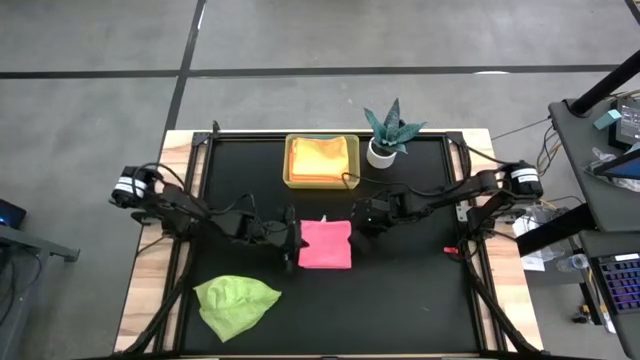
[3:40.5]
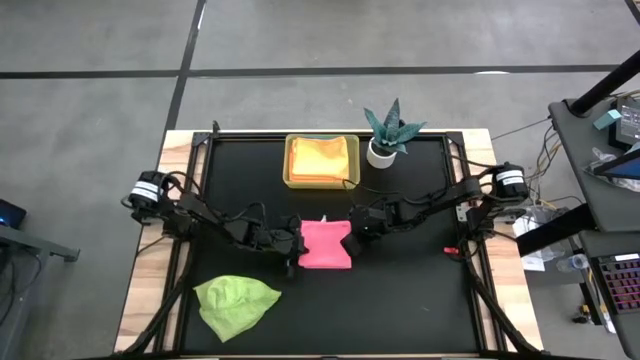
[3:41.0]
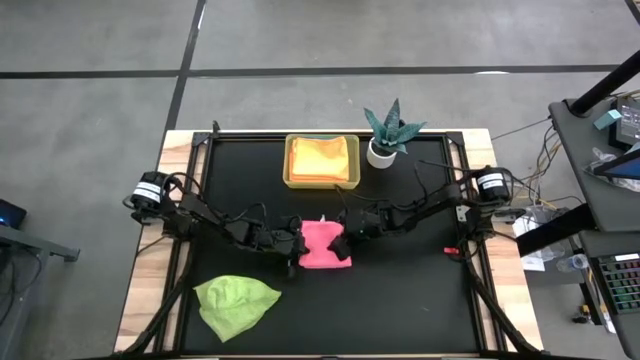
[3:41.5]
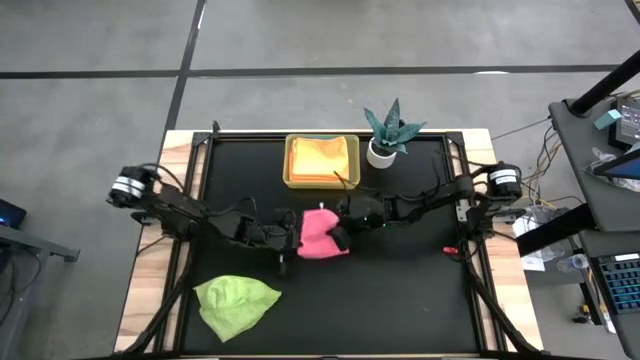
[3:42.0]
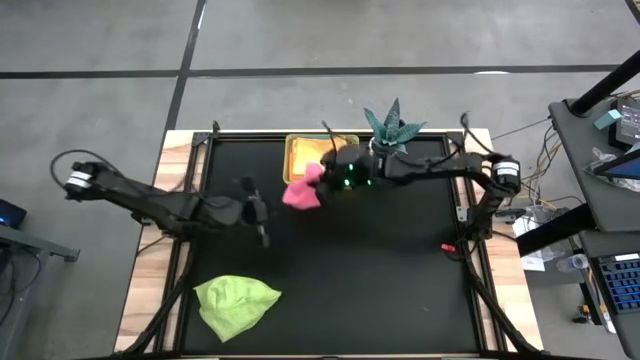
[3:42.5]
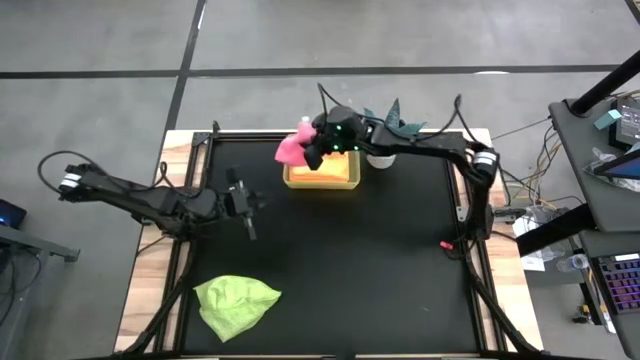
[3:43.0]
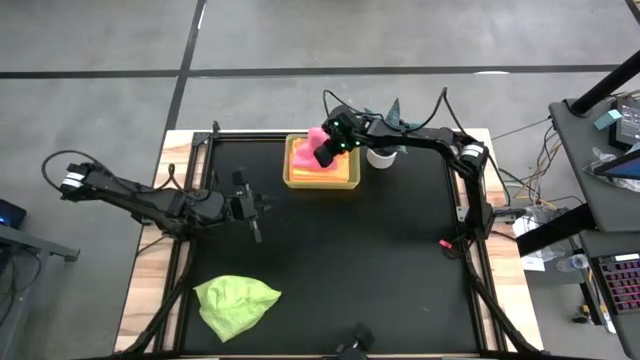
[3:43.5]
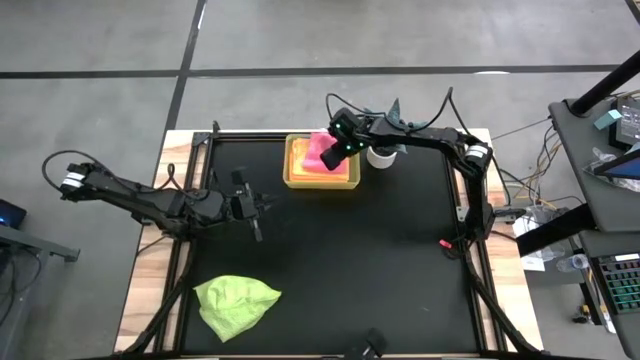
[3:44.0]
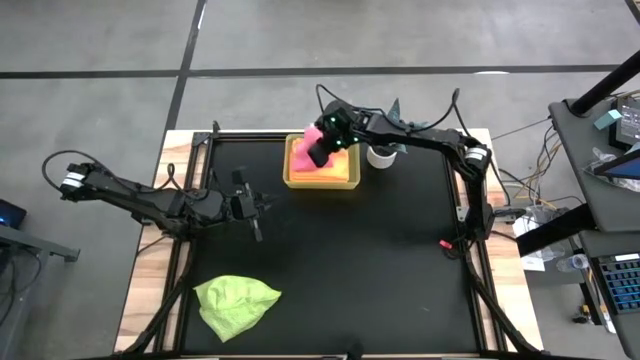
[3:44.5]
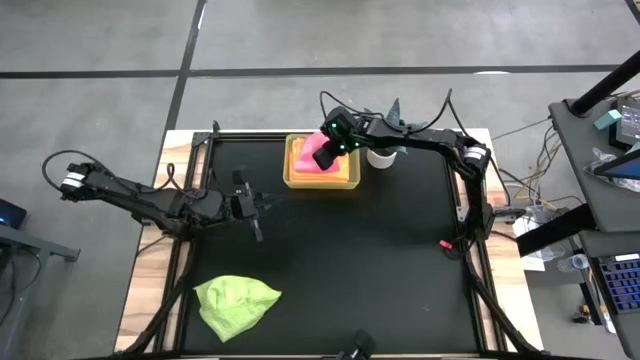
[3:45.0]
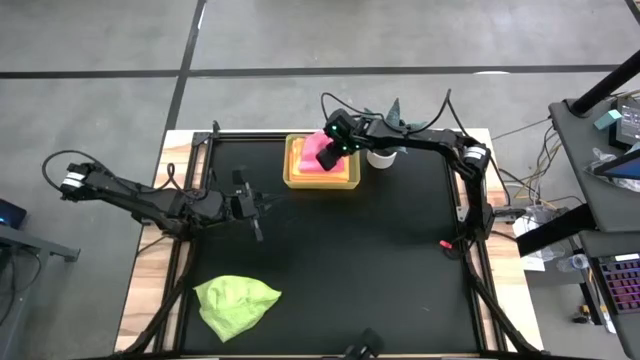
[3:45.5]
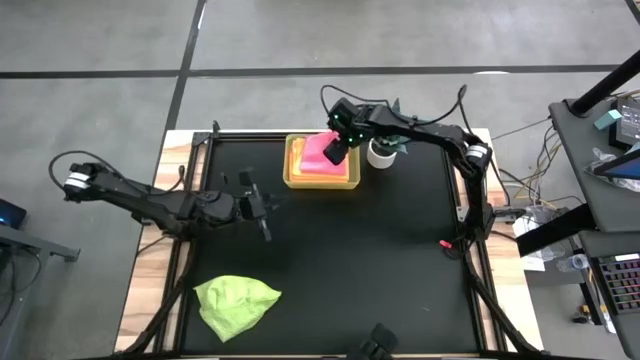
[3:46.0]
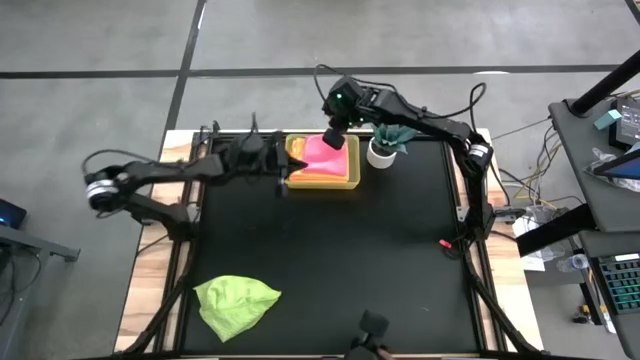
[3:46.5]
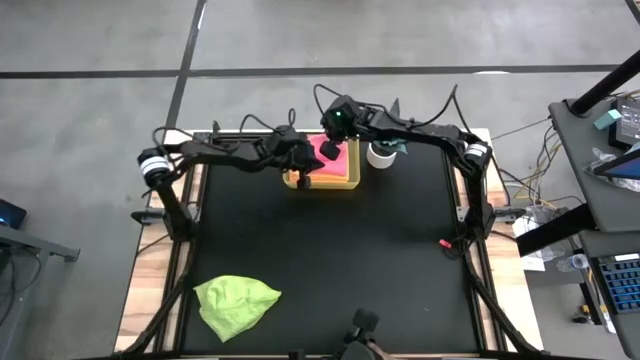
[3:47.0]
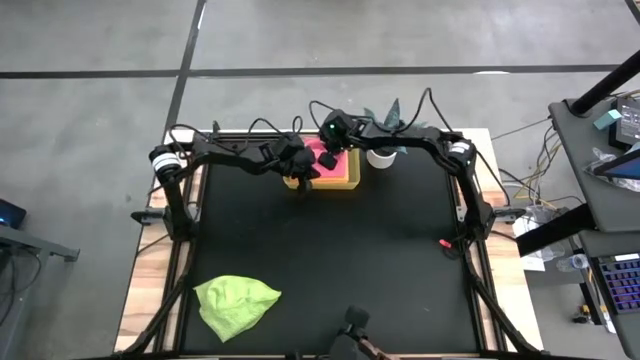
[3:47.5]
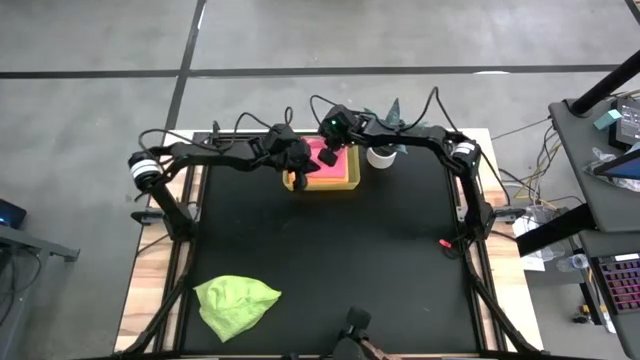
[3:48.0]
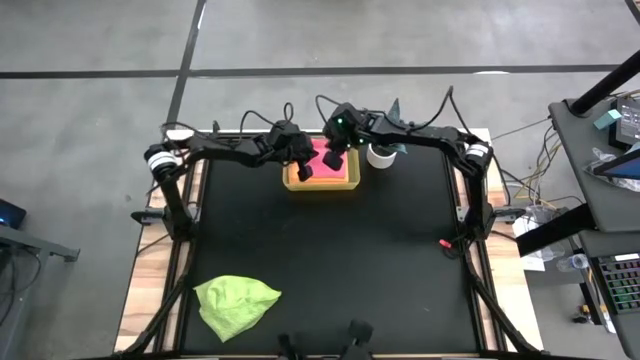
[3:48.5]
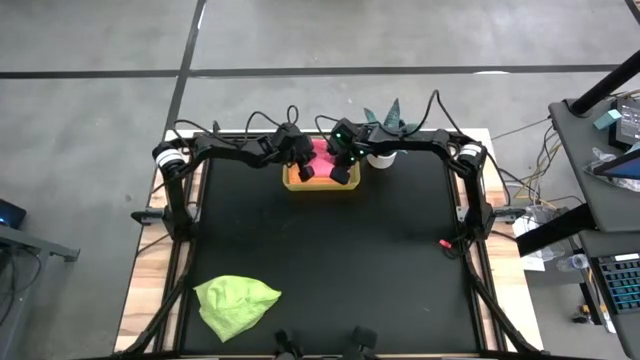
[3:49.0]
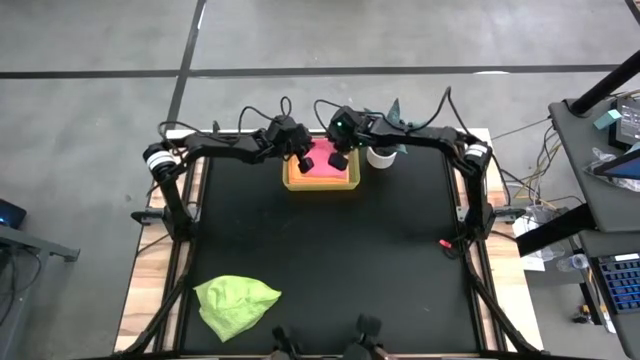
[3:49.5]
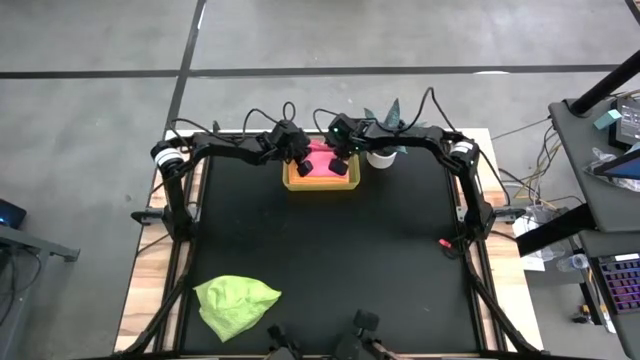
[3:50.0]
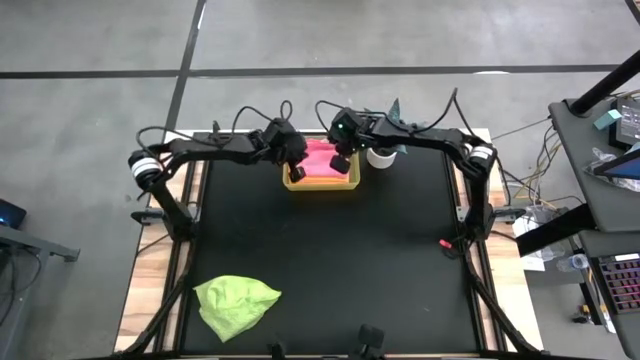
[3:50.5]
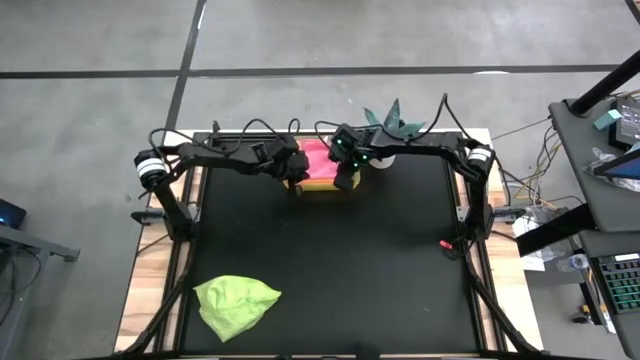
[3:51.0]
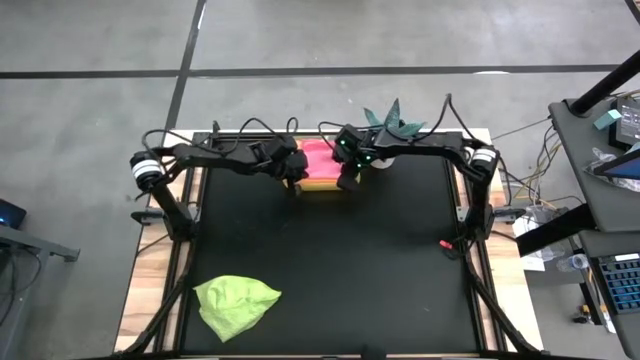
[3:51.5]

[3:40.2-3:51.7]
Task: Fold microfiber towels
Put the pink microfiber cloth into the yellow bin

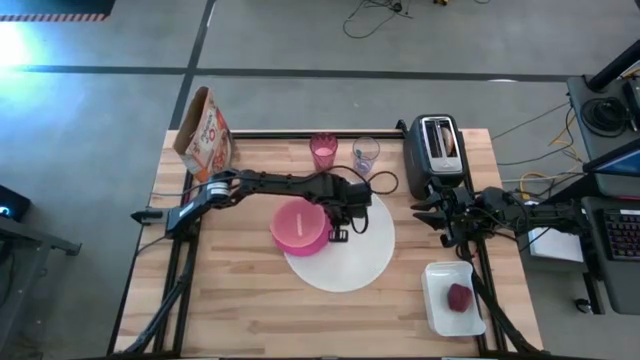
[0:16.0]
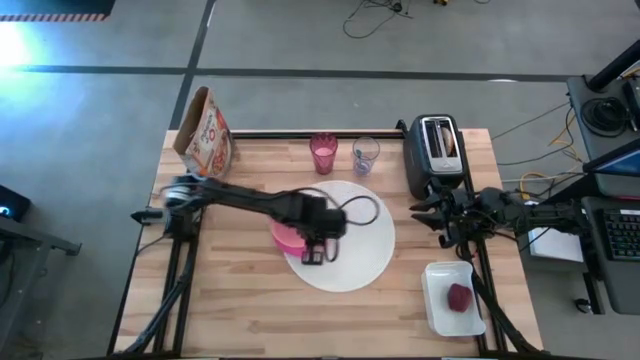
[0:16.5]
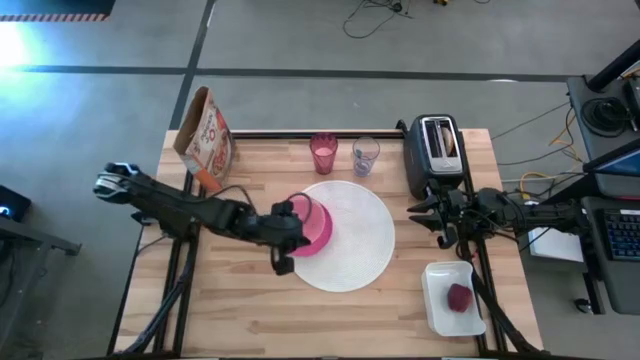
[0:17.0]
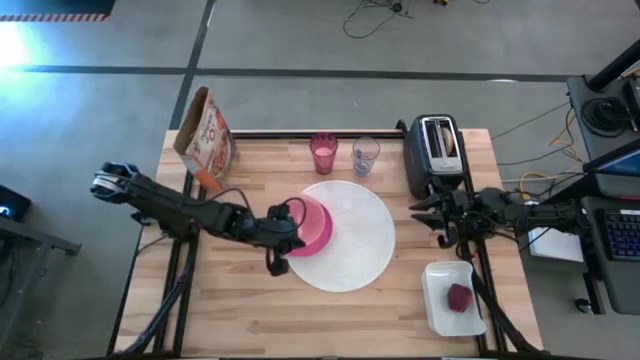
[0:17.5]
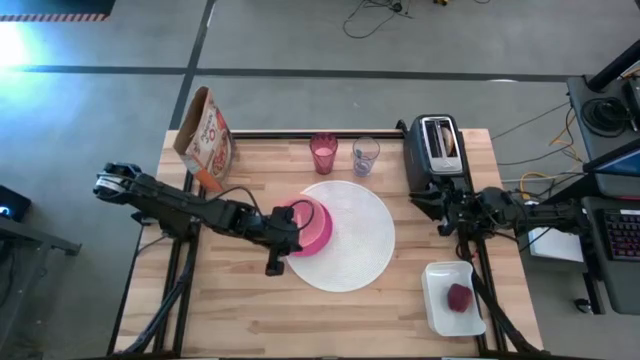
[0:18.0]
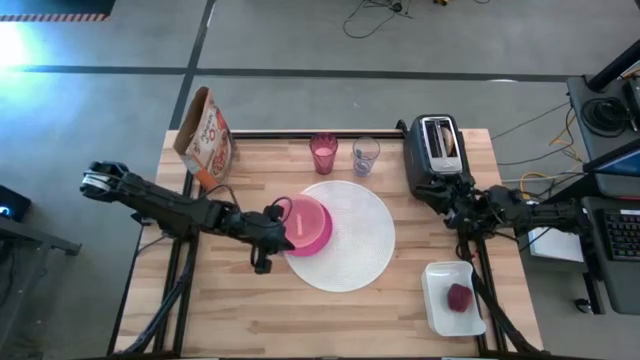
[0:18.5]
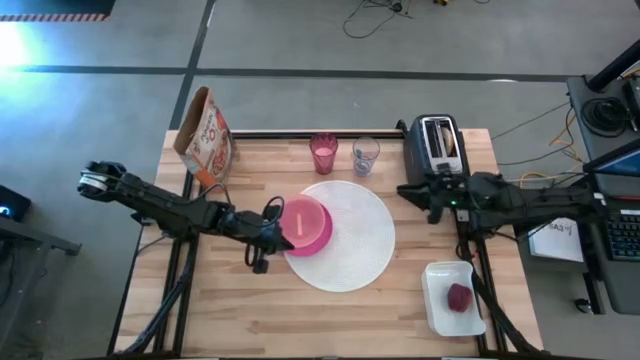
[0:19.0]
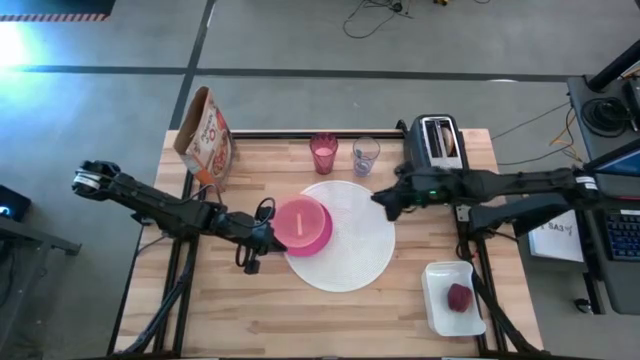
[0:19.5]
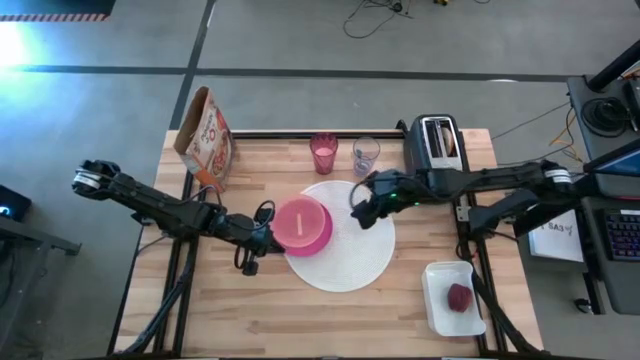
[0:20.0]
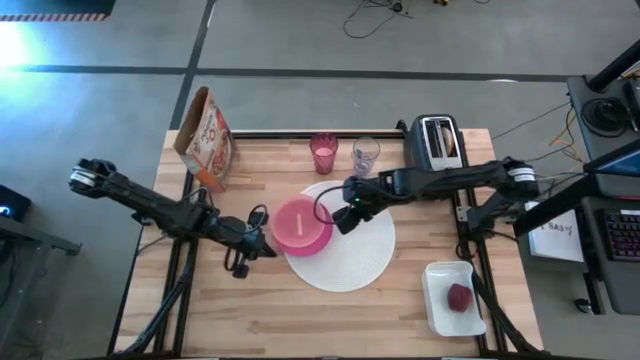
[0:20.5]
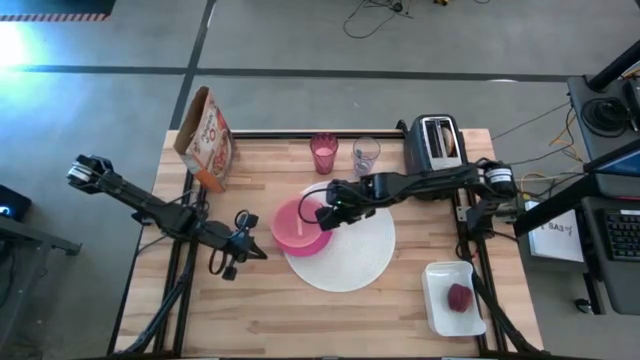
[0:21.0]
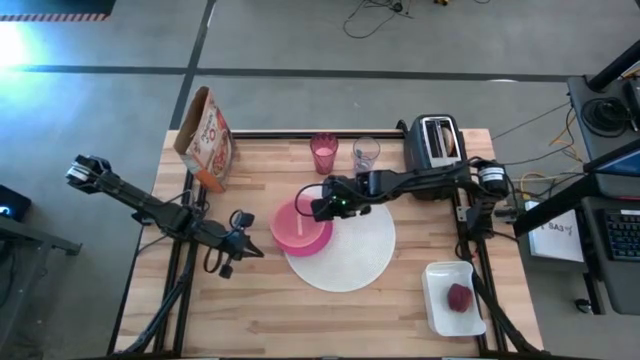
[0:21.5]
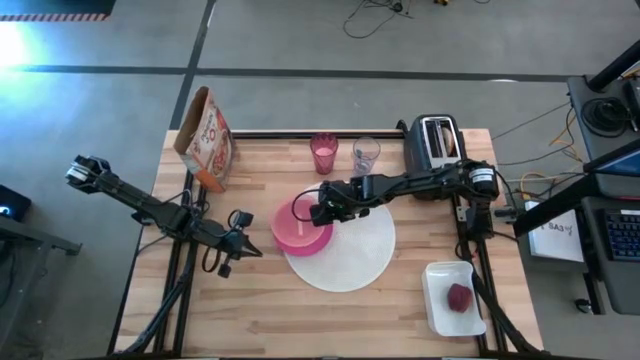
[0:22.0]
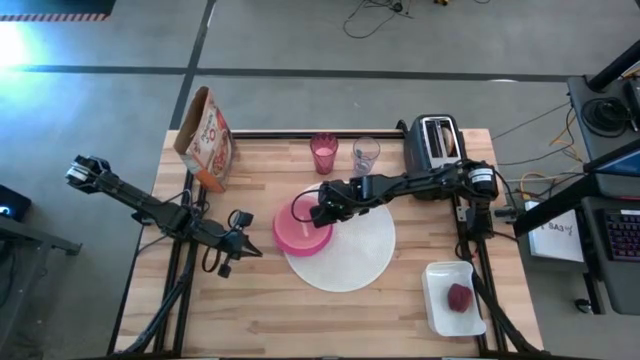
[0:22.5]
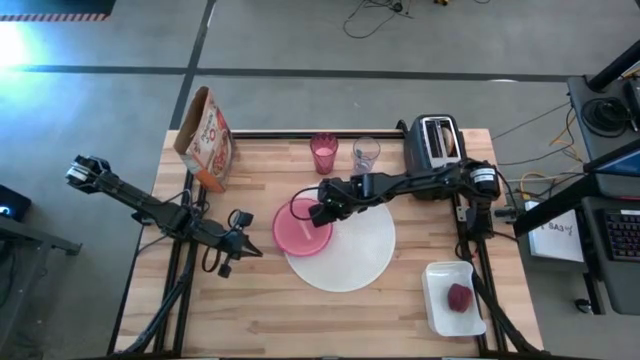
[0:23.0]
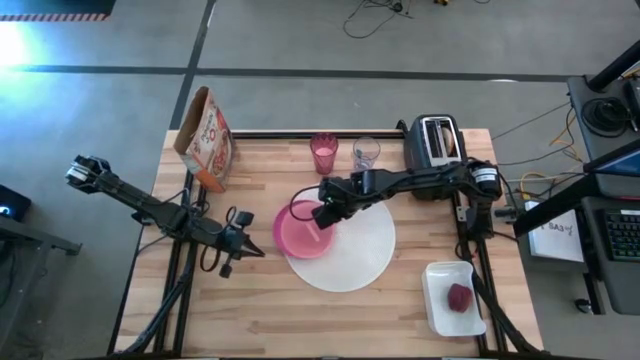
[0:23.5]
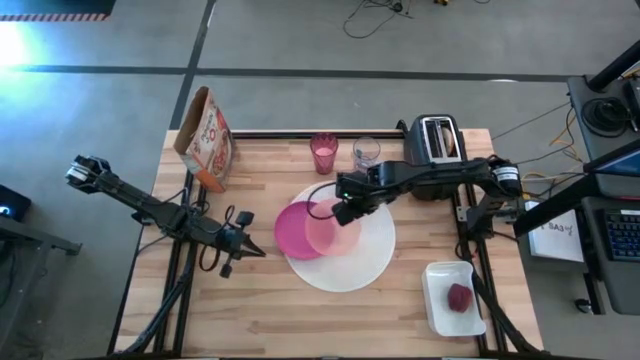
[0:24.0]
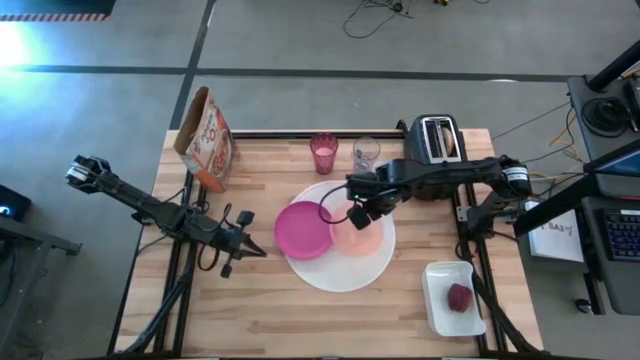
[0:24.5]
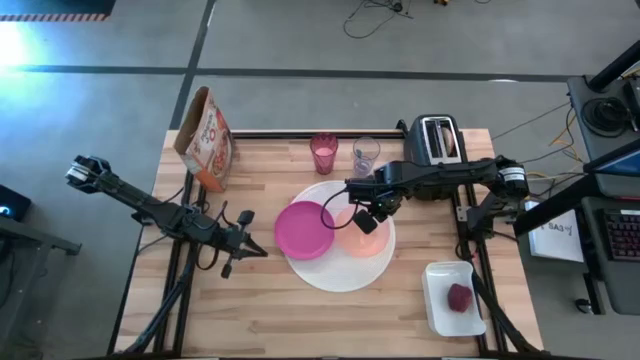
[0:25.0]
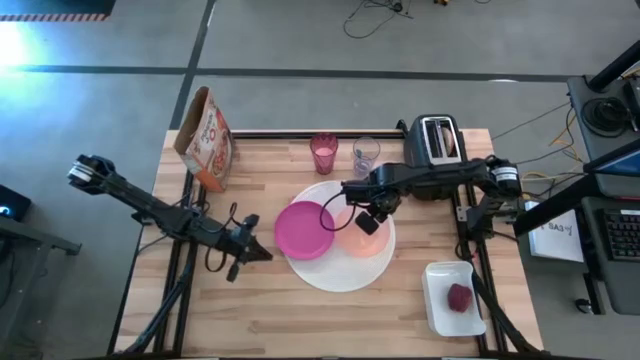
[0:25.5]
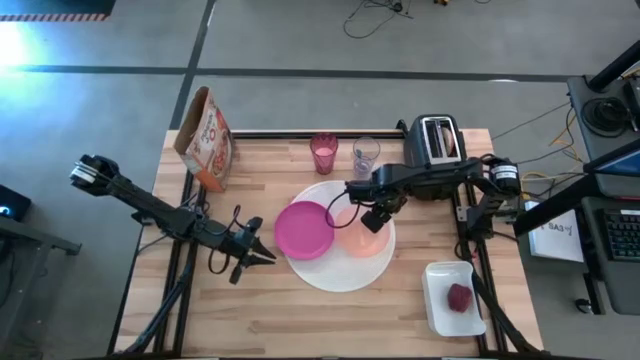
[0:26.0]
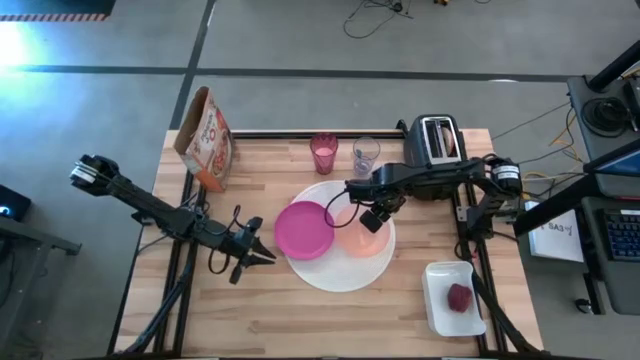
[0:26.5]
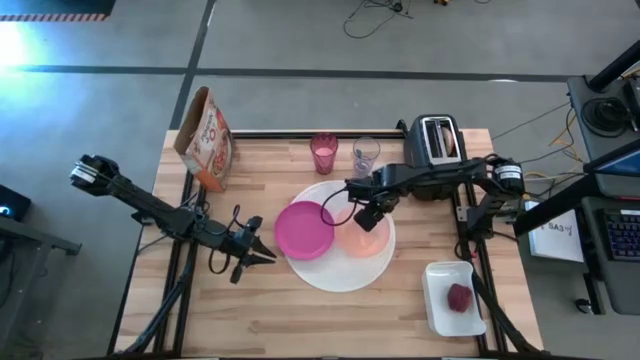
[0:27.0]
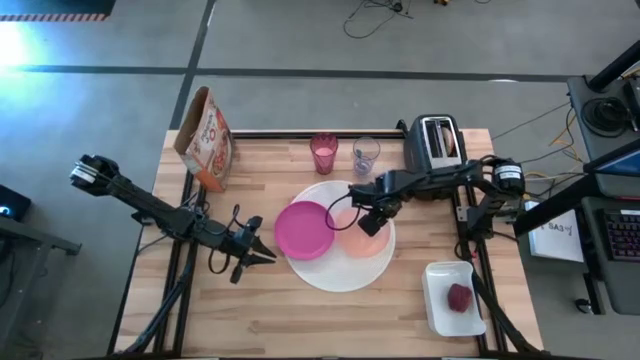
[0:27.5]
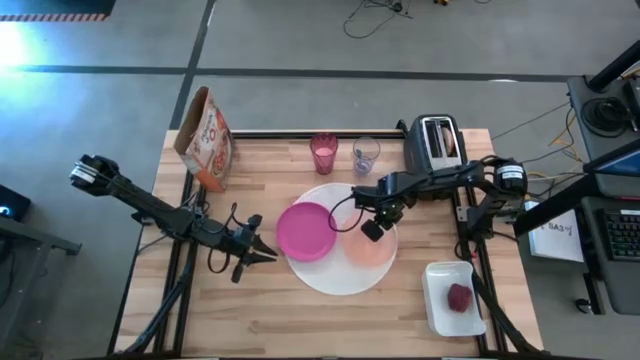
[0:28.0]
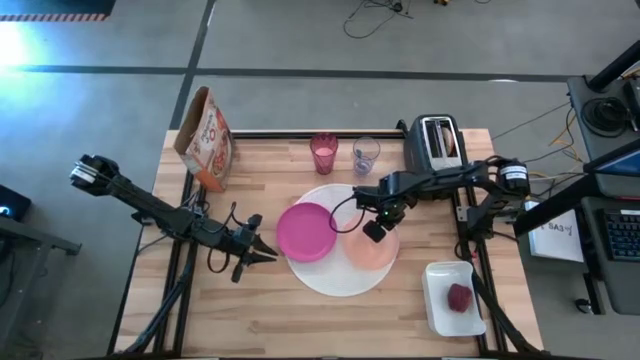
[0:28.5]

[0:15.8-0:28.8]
Task: Arrange a breakfast setting
Put the orange bowl to the right side of the pink plate on the table mat
